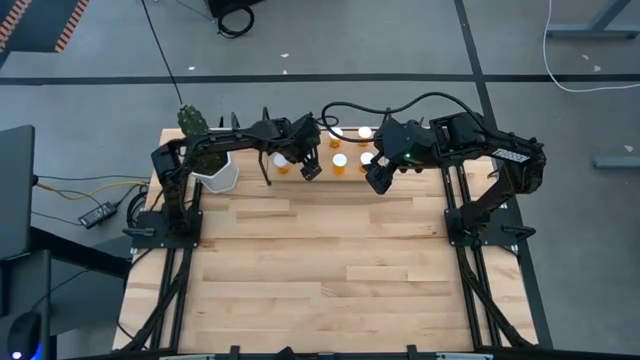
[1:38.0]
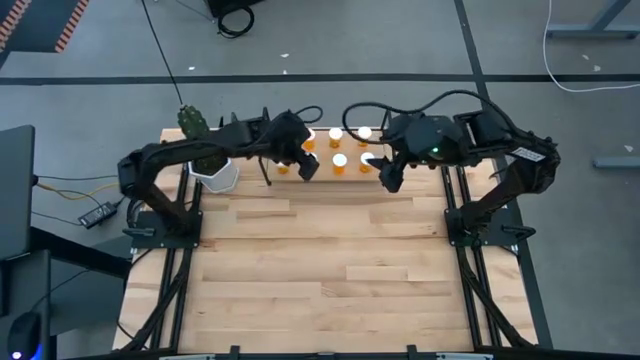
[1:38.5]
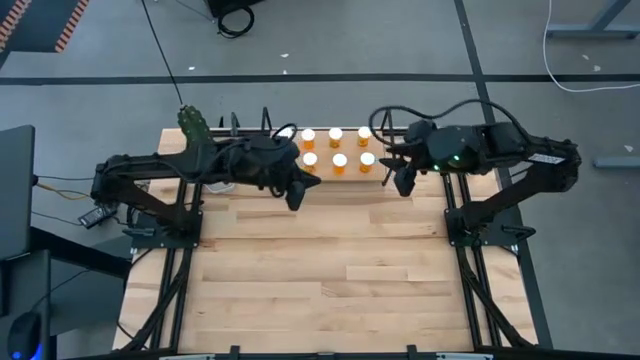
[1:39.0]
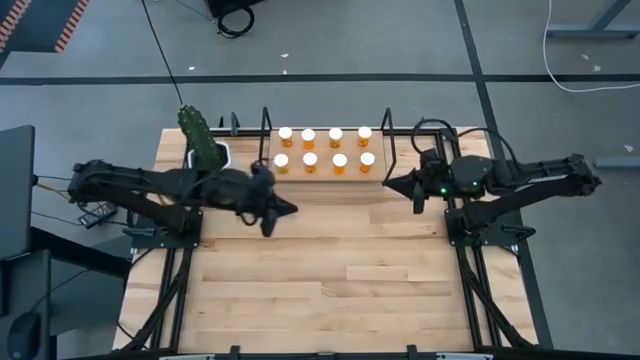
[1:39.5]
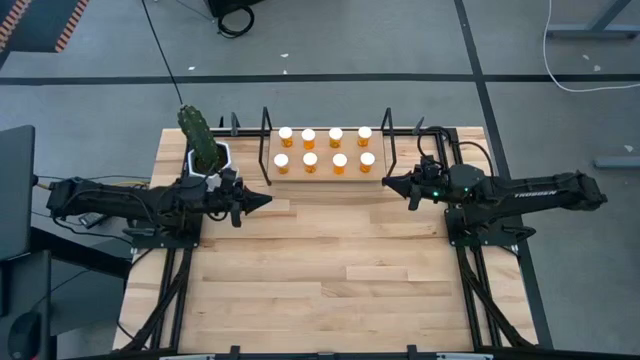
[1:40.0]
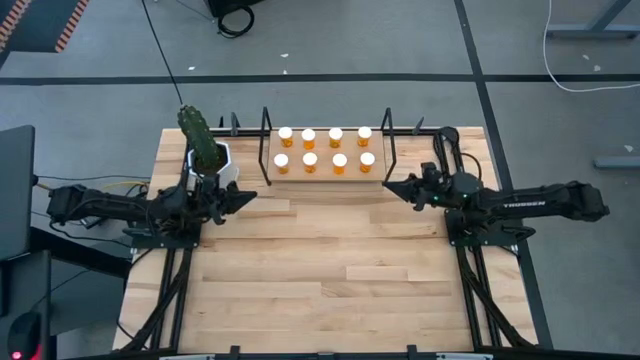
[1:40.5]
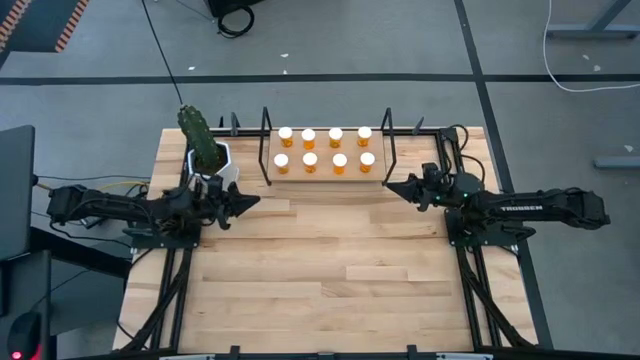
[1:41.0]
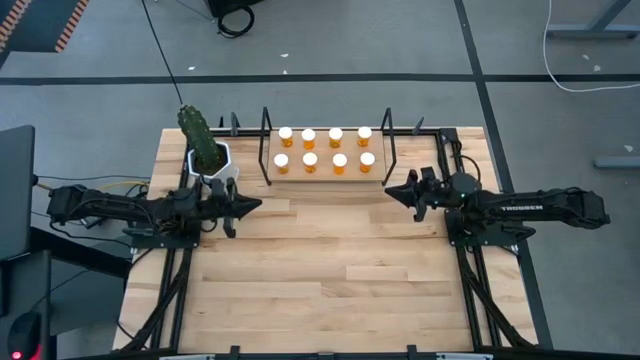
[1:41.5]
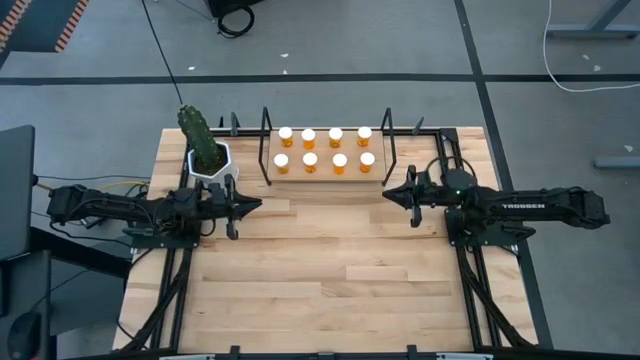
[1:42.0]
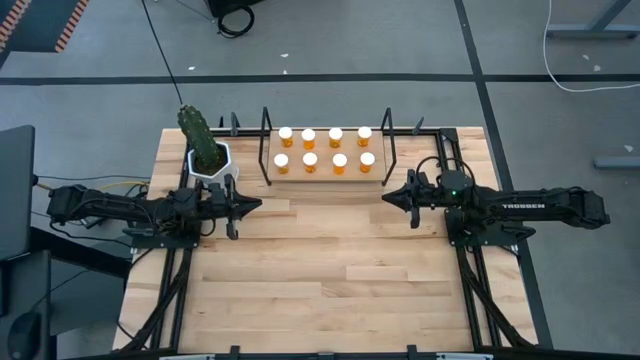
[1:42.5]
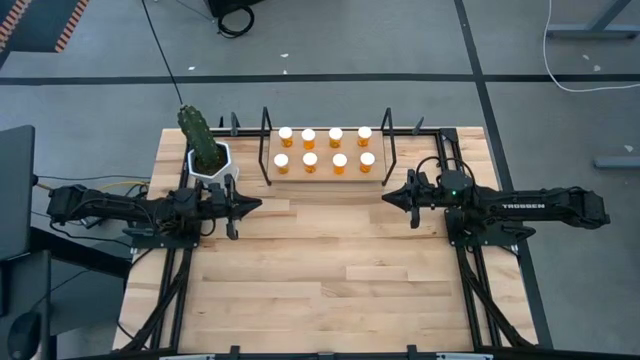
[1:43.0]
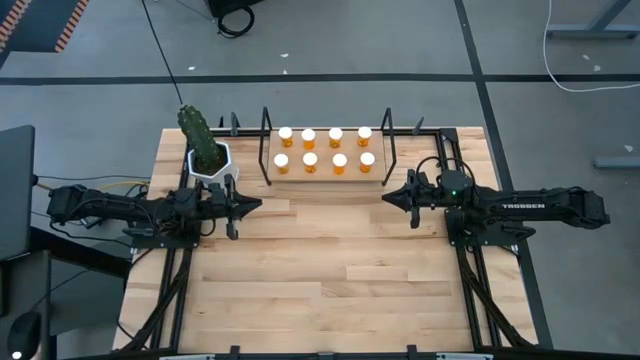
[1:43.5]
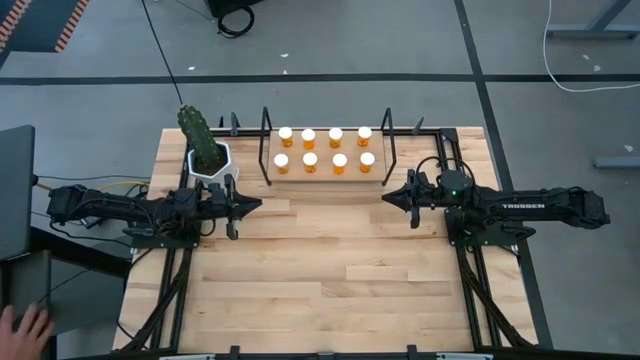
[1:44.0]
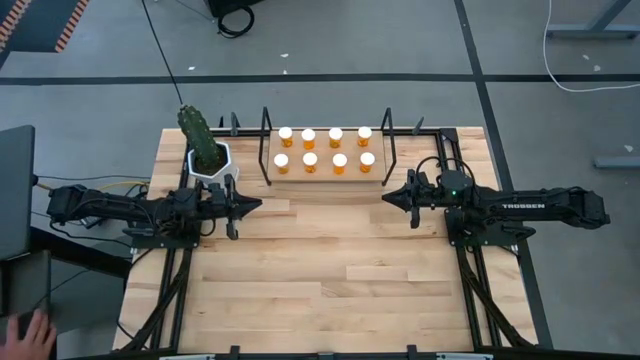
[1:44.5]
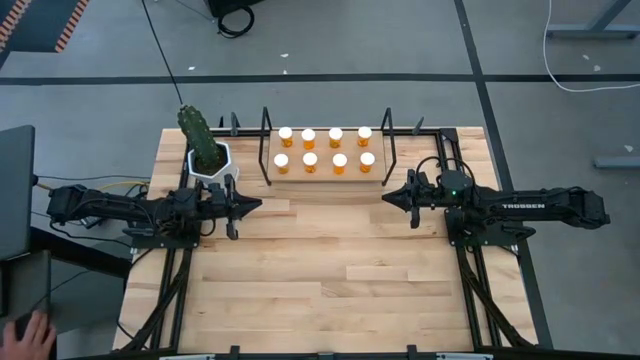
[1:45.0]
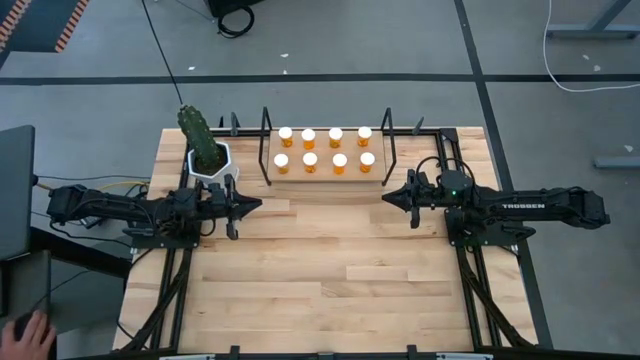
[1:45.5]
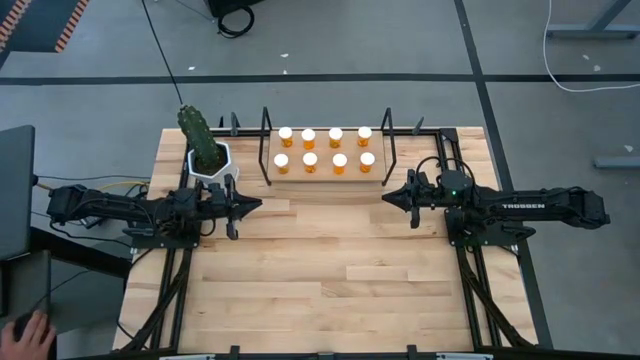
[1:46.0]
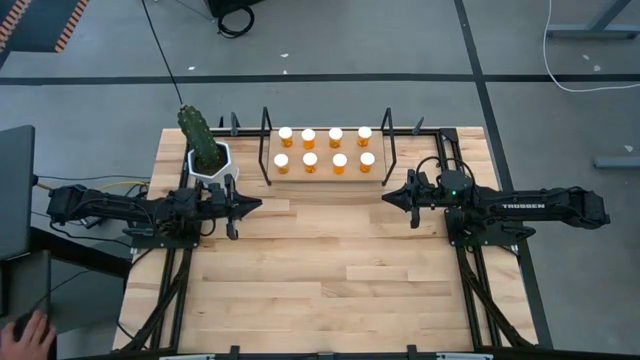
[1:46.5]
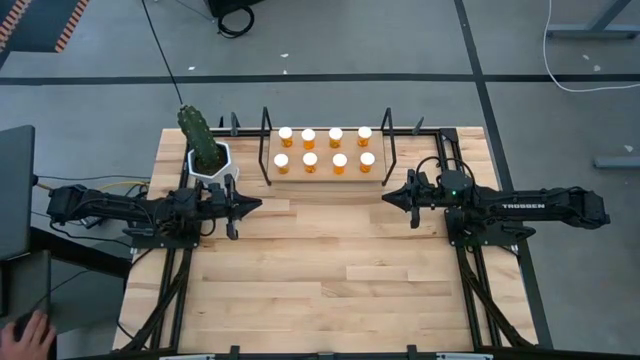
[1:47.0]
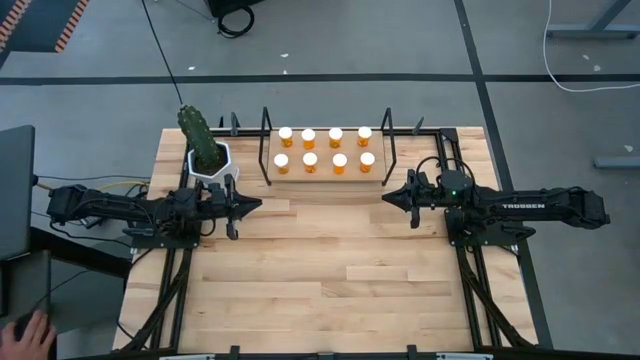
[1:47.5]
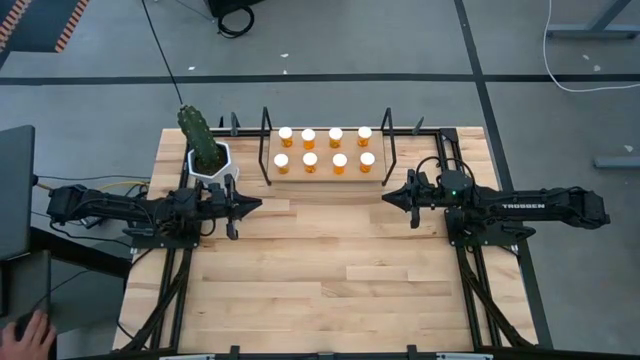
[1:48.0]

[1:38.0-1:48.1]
Task: Pick and place medicine bottles onto shelf by color
Return to Home Position

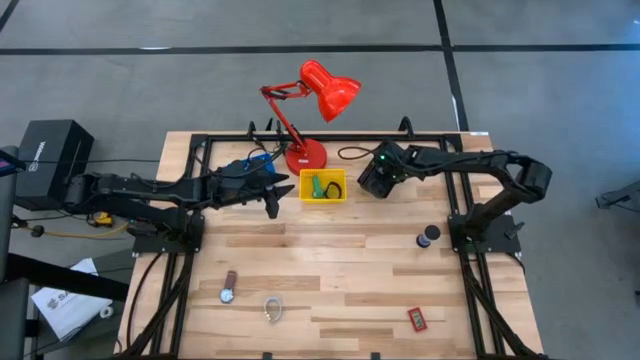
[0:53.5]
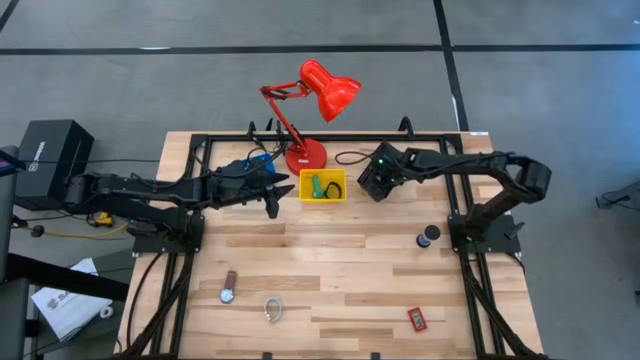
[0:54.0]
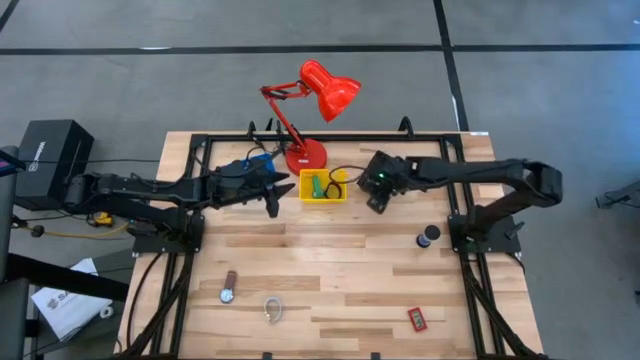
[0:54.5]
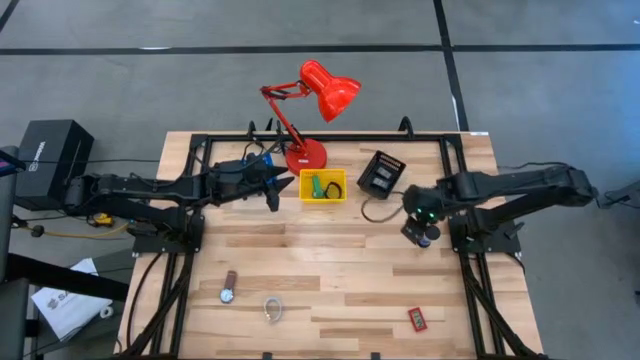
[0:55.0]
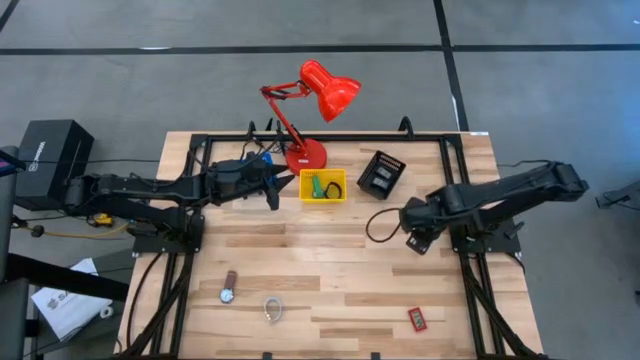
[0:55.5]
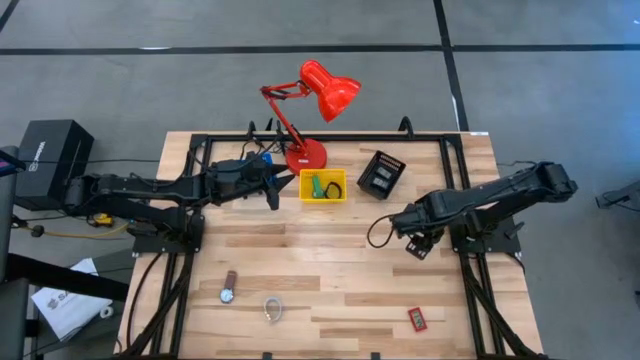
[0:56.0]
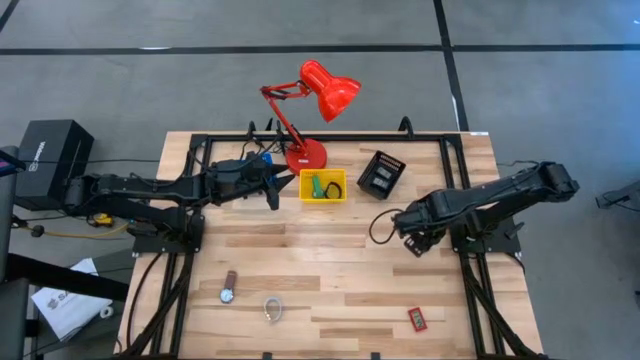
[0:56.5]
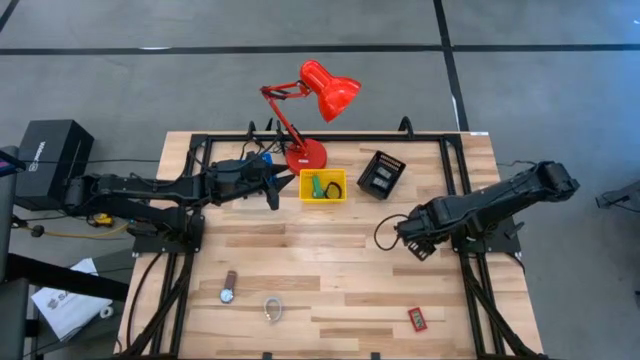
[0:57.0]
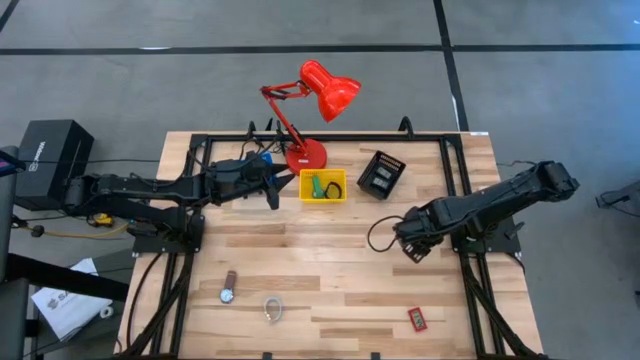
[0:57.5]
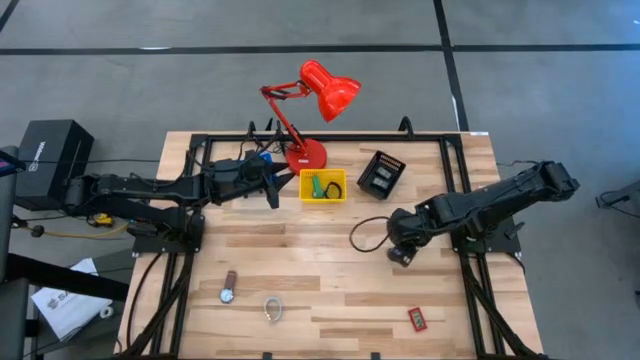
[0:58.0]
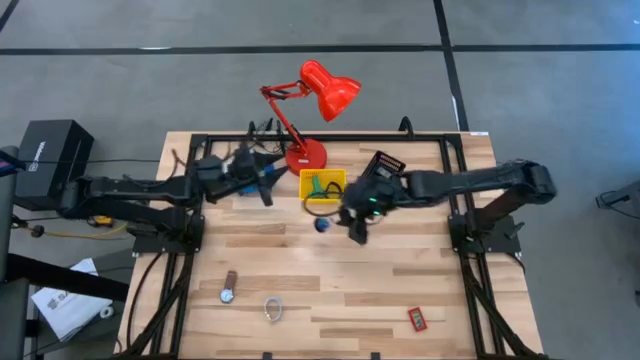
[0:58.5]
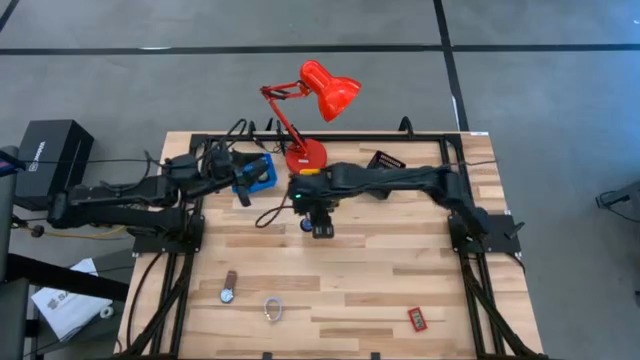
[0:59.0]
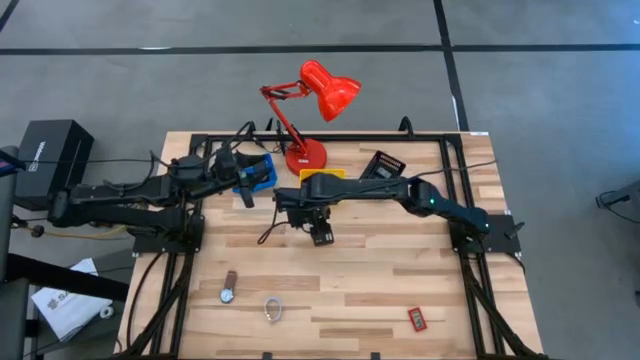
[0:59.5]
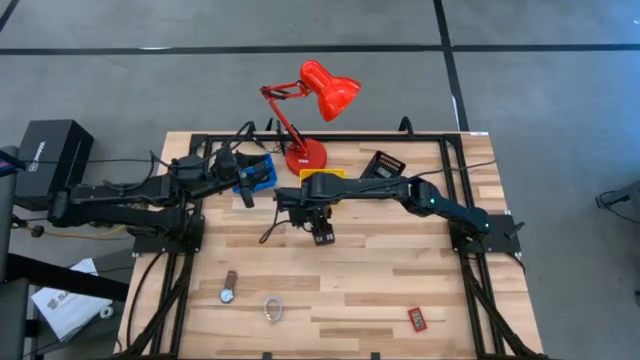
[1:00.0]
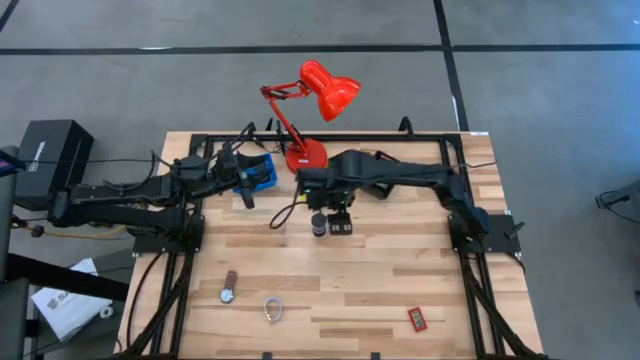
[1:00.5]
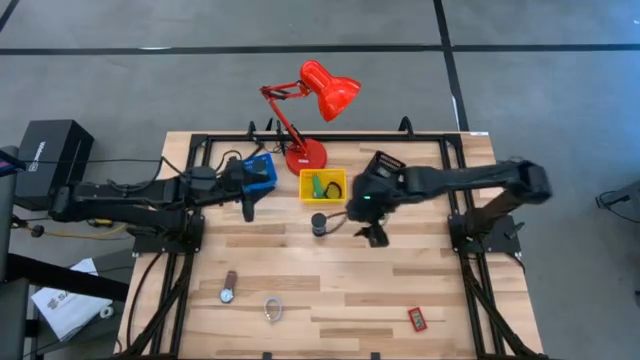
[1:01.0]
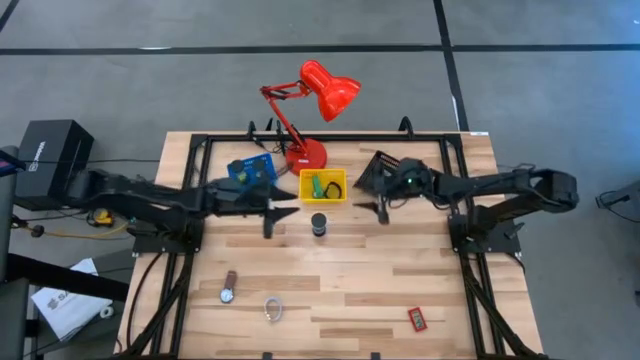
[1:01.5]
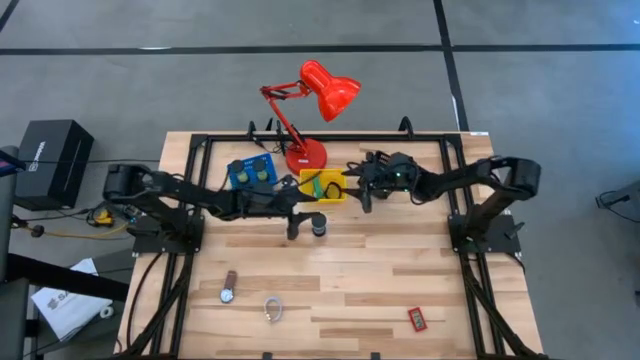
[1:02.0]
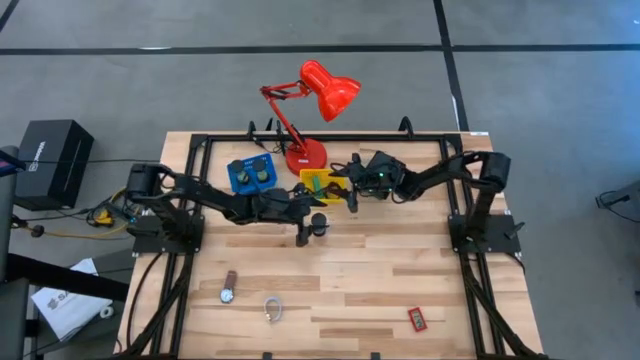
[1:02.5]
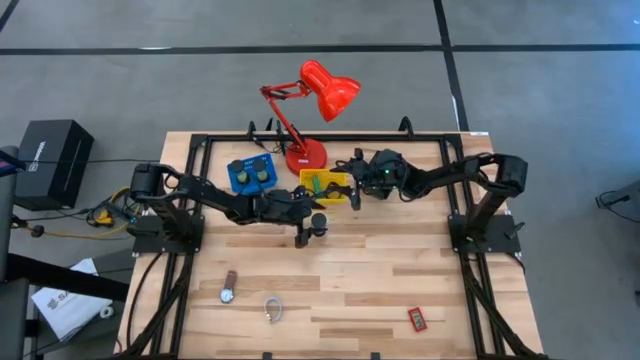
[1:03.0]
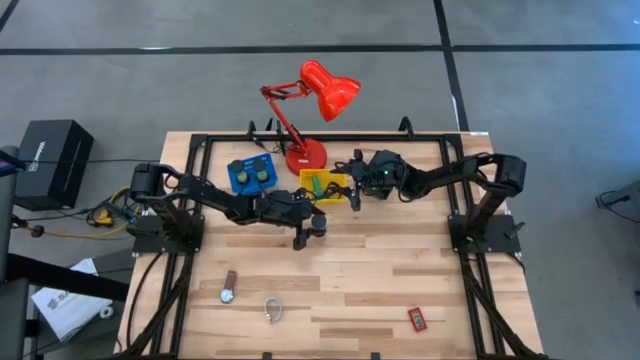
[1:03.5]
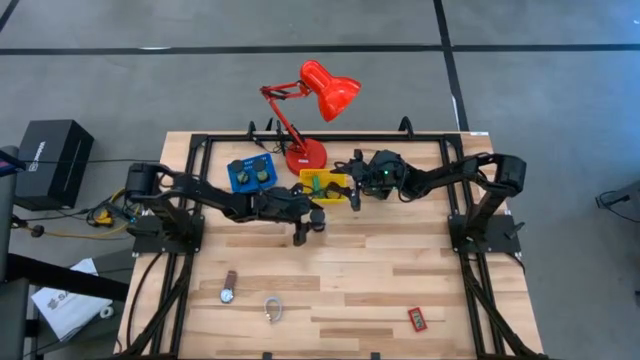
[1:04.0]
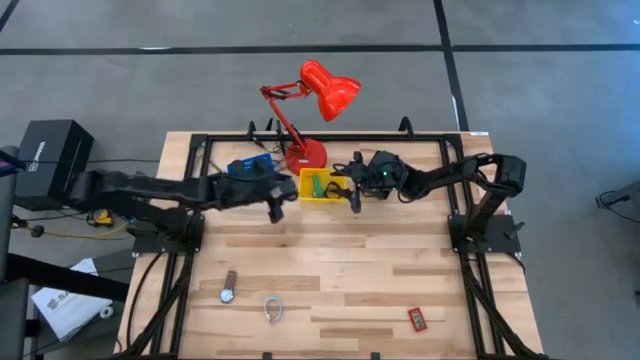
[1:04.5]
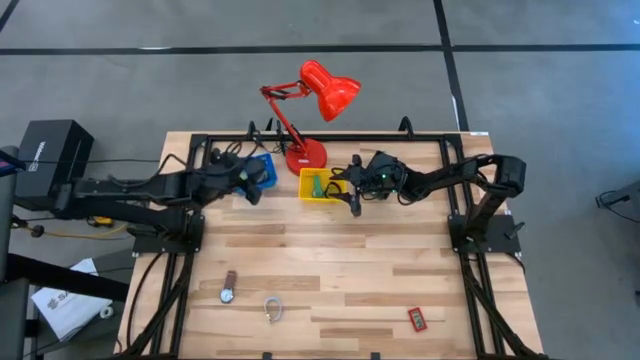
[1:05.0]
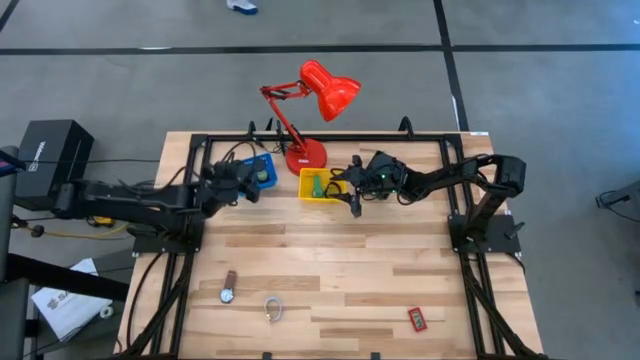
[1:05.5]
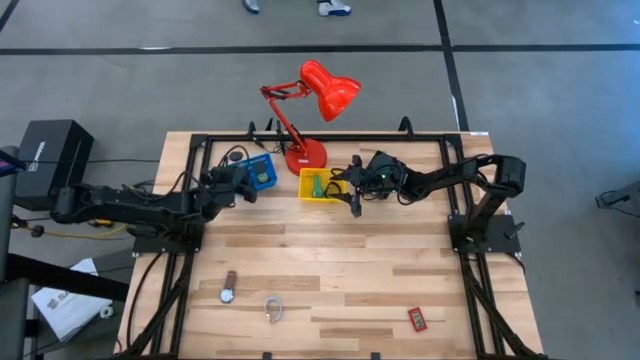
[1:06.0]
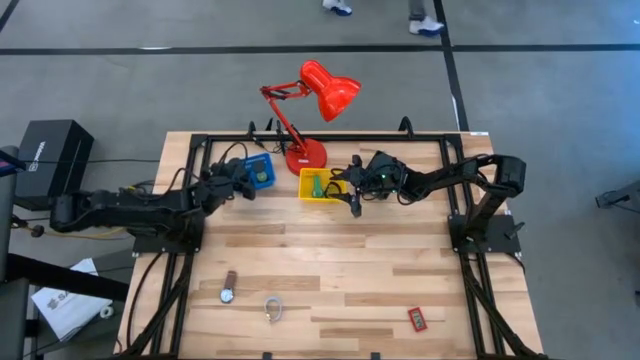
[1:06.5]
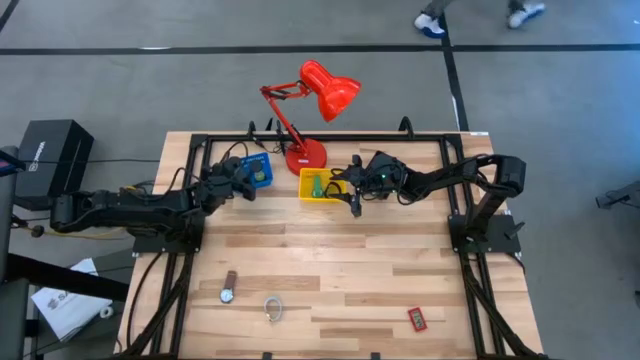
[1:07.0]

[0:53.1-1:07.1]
Task: Pick & Place Office items
Put the blue hourglass into the blue bin
